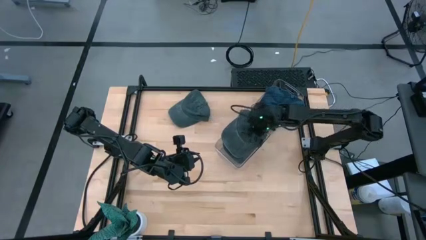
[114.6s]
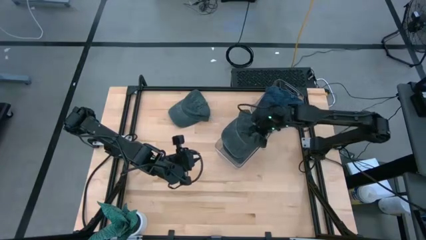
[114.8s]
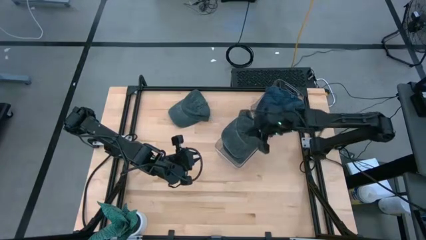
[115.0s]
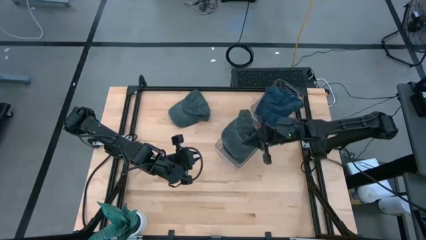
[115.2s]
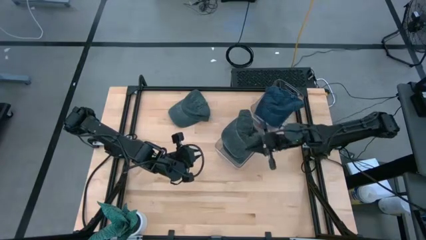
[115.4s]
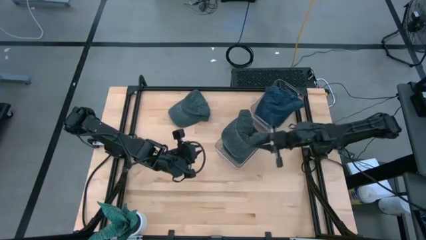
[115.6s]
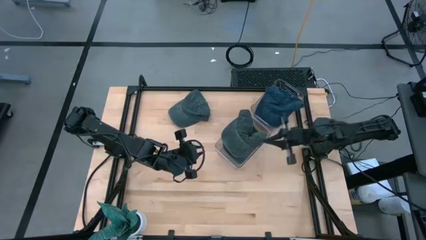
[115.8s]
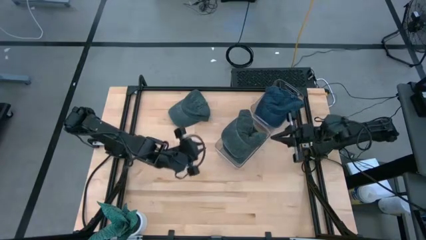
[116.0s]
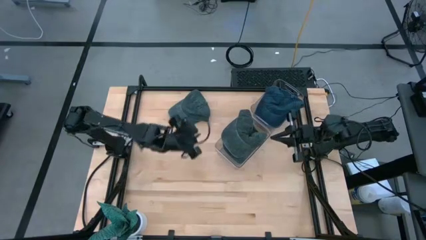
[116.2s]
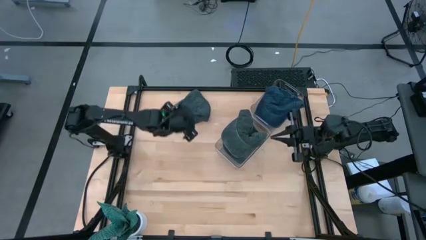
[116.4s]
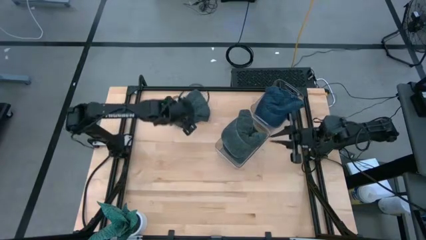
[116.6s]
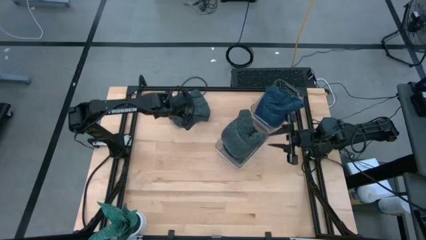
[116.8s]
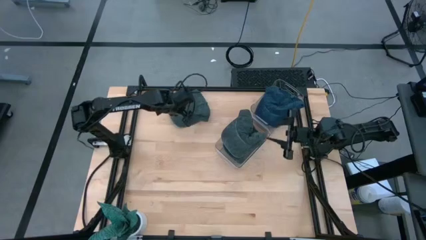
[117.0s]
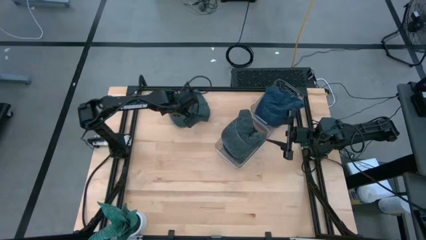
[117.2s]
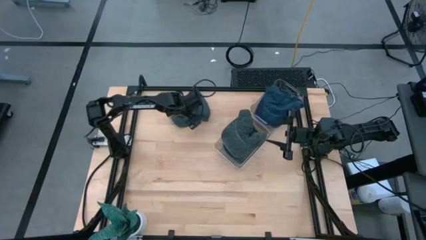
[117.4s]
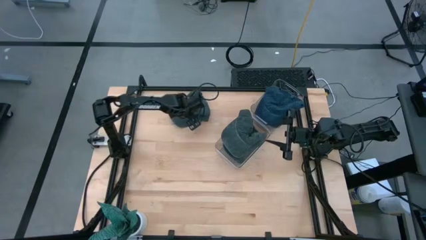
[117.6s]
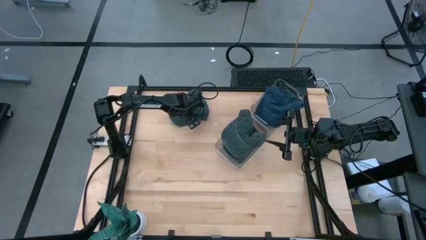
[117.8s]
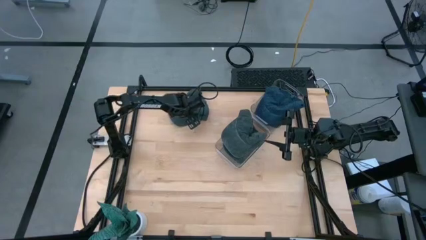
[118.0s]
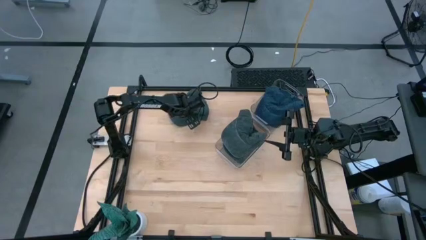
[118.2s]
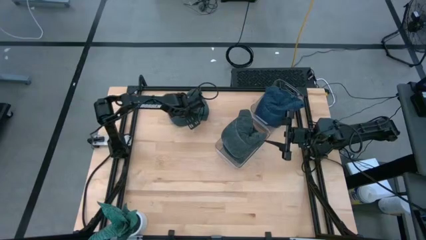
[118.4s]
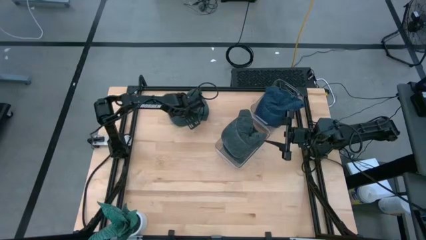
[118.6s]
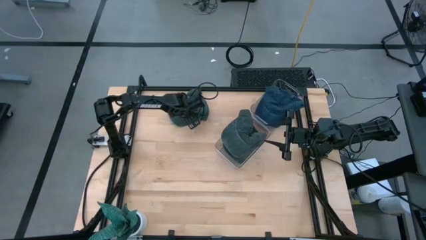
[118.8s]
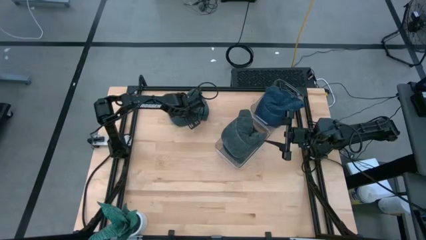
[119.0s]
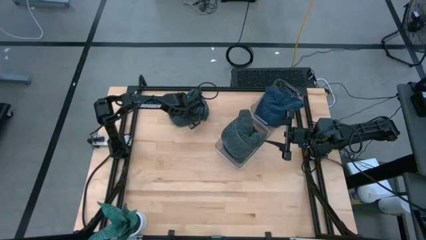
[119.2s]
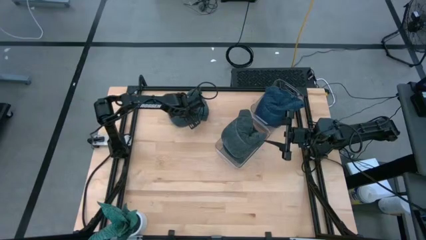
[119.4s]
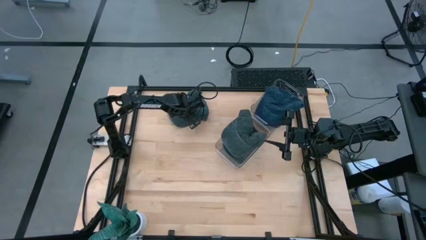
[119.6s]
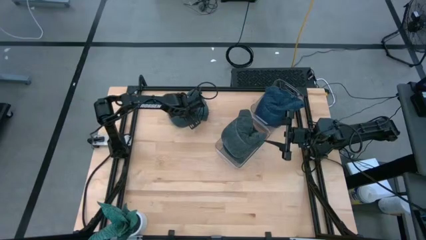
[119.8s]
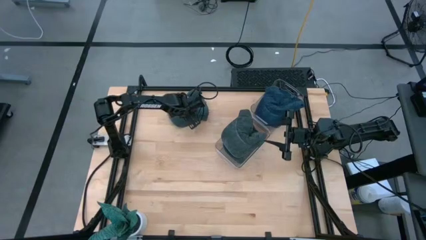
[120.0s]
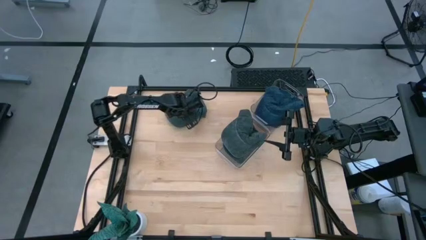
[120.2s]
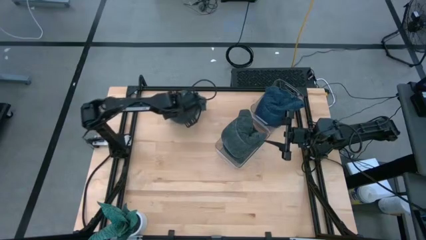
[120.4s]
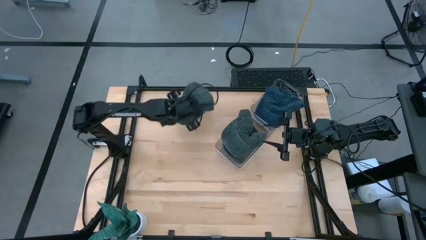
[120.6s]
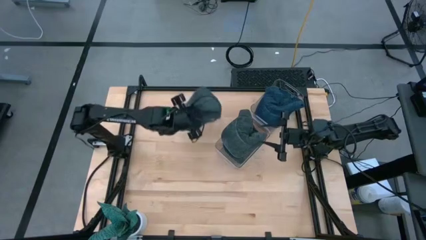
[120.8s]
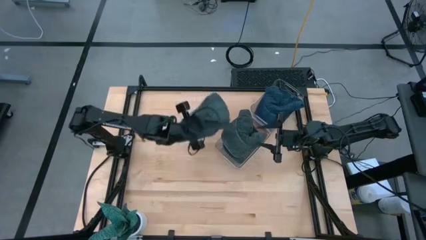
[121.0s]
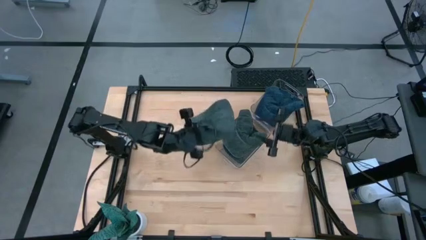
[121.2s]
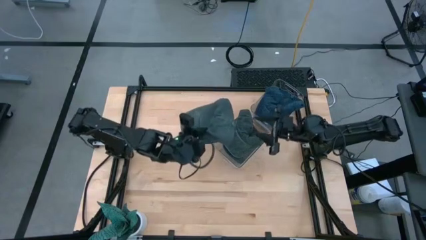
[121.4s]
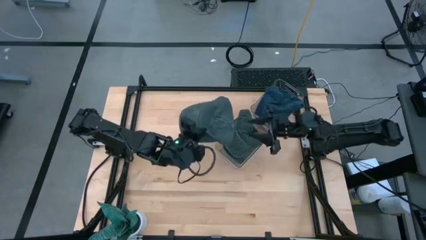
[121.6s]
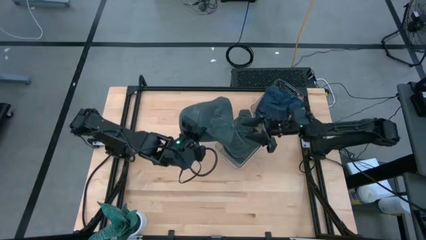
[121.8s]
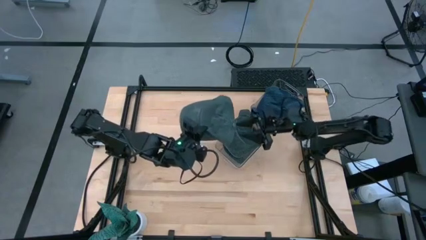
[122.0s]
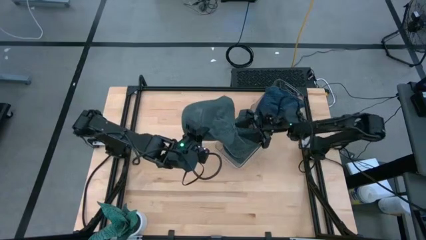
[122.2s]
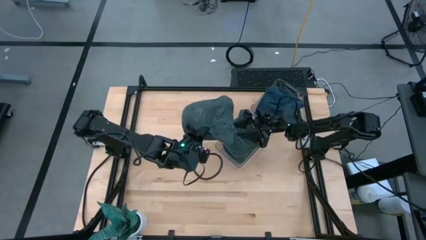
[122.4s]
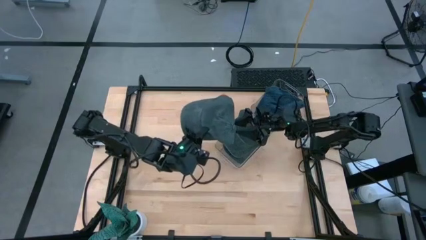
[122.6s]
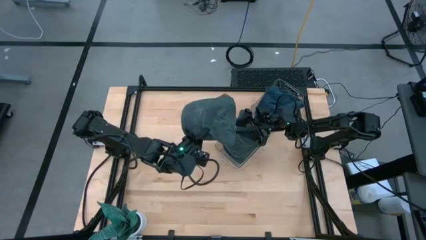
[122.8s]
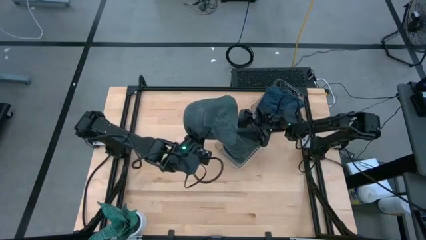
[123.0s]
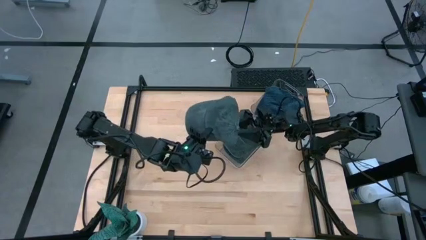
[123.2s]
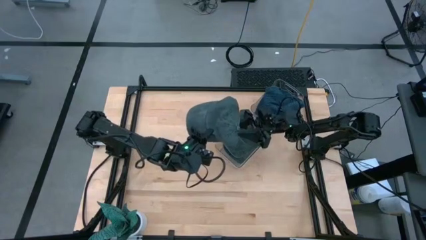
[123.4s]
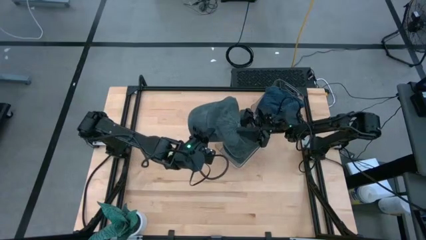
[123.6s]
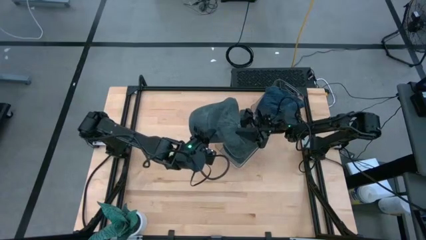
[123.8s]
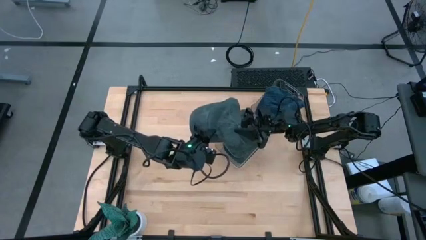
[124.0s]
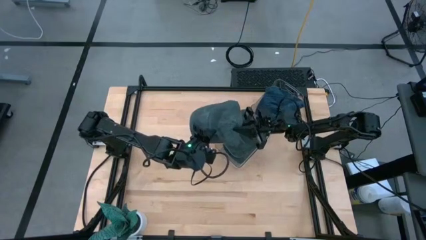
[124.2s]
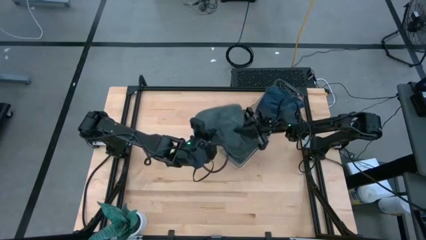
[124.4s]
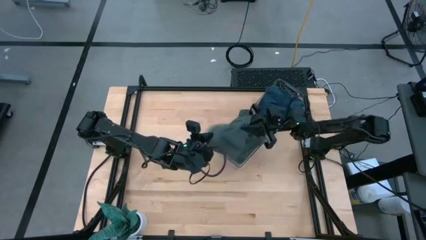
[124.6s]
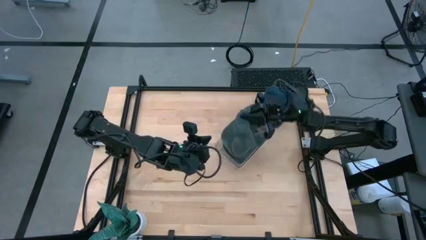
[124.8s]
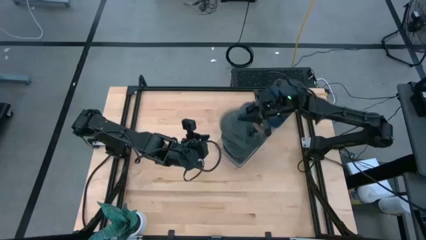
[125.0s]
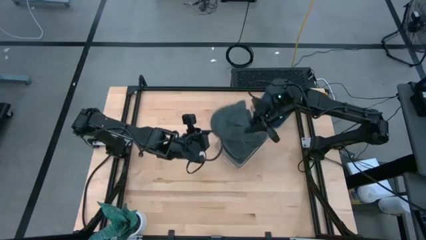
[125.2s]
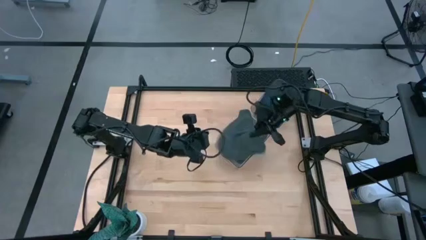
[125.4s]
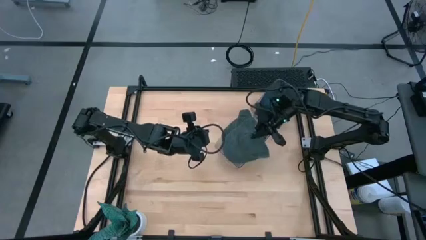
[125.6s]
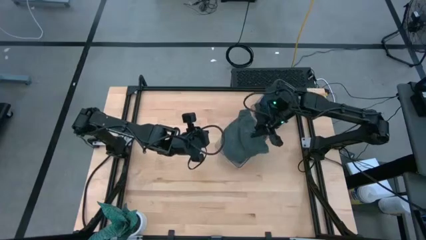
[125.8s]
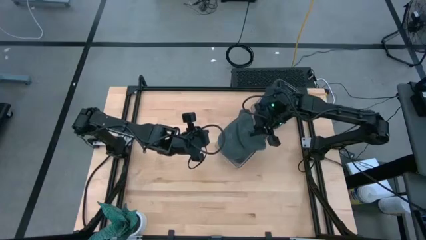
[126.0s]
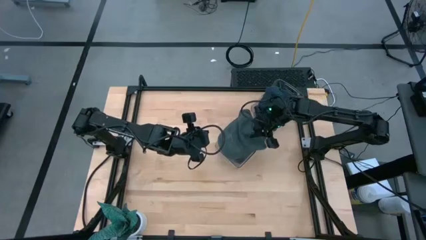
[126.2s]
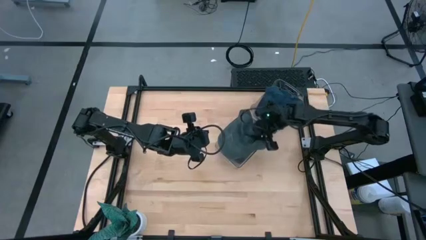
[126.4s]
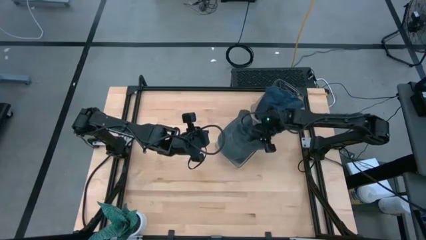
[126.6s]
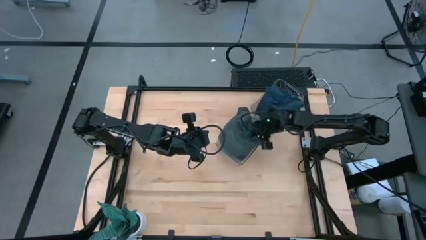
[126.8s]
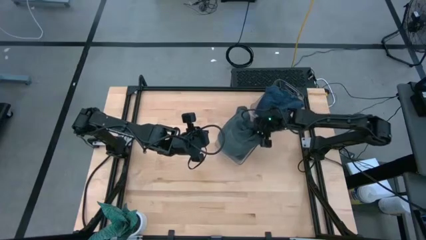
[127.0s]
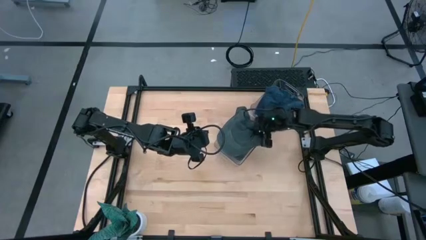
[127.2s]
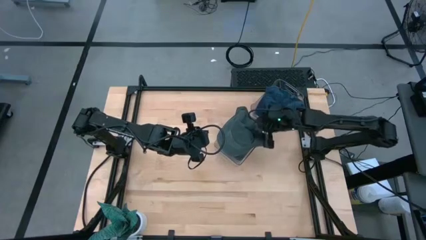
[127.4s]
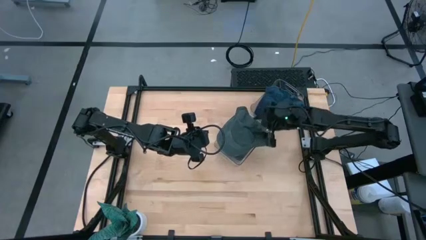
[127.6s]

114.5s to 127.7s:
Task: Pick & Place hat
Put the gray cap into the bottom transparent bin

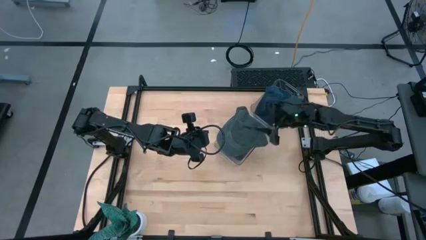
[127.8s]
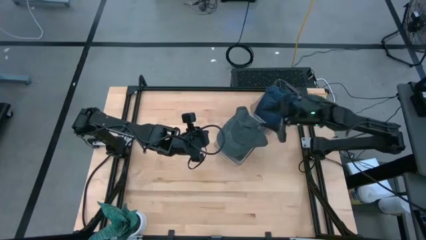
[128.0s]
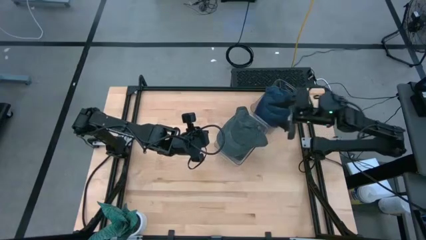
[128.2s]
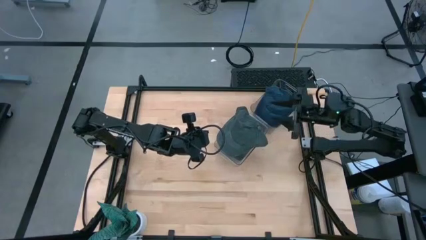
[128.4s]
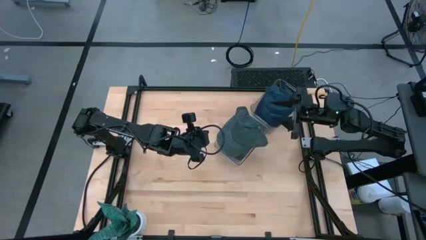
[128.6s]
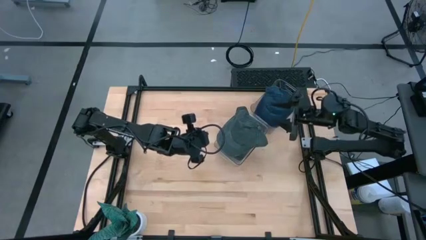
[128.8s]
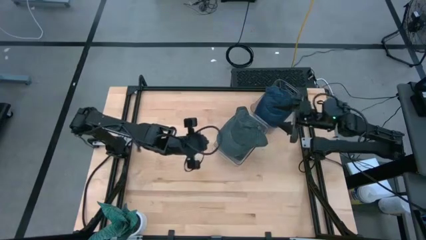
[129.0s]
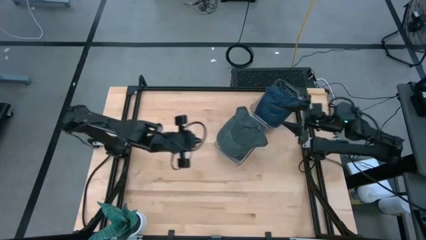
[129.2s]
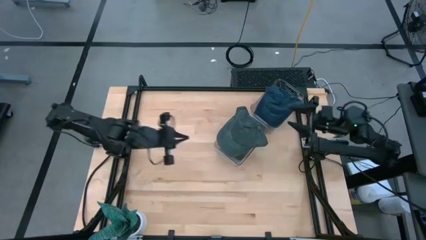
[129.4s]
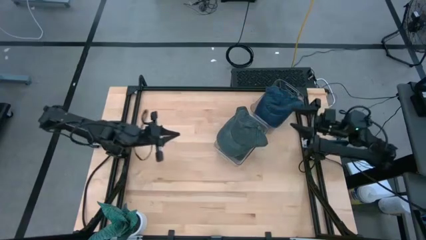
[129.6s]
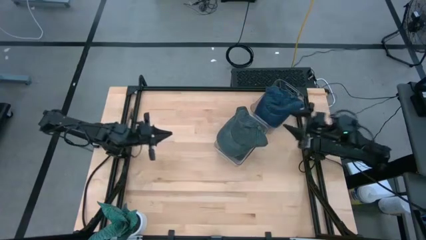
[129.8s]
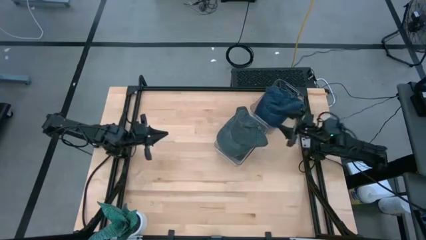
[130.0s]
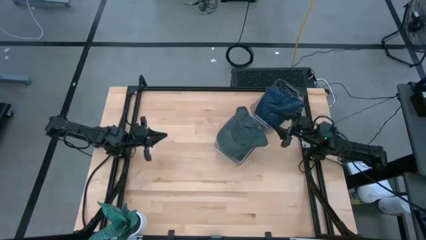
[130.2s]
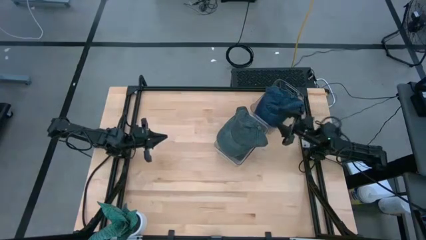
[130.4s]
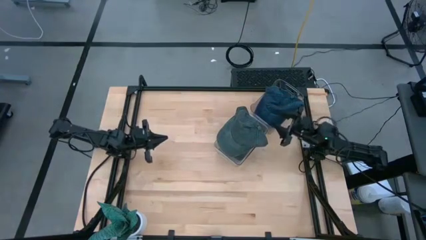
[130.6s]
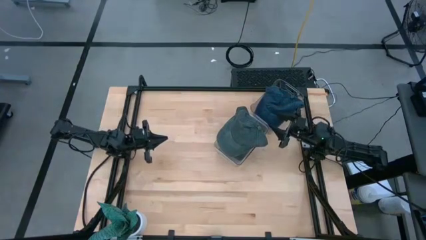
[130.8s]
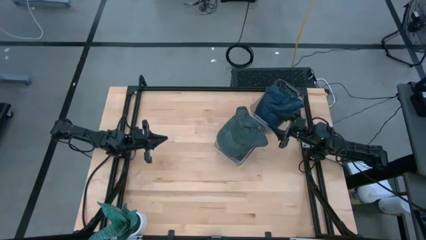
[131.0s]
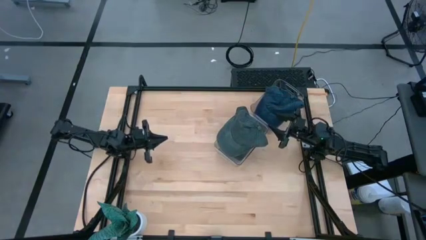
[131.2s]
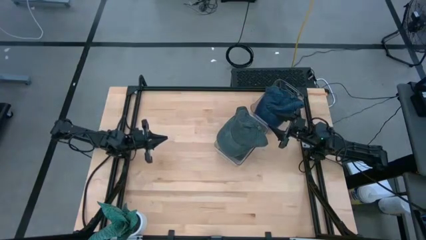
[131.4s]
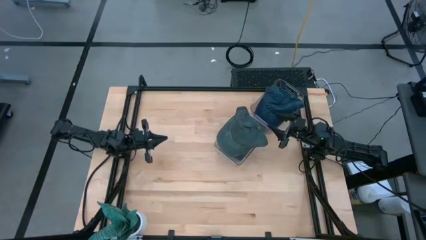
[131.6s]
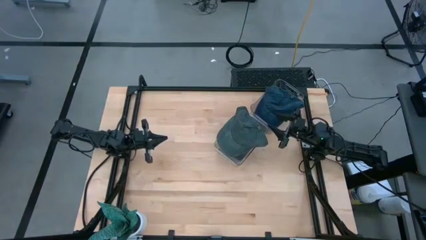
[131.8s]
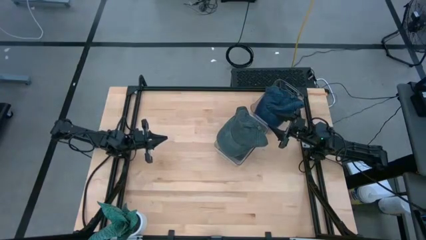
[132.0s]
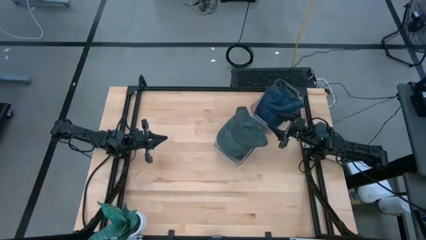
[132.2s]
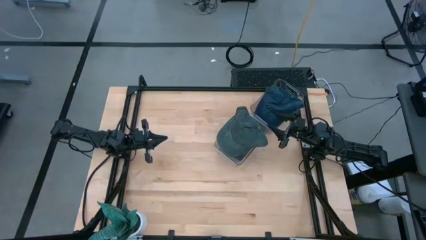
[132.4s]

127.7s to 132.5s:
Return to Home Position
